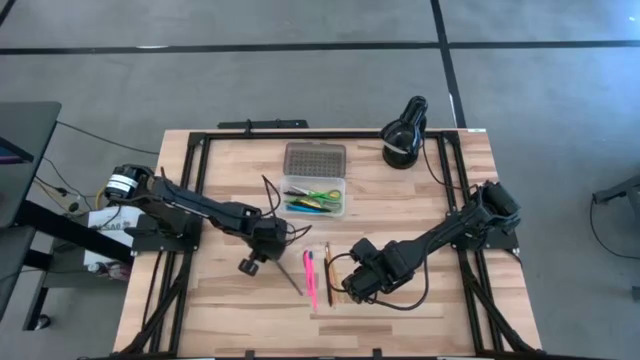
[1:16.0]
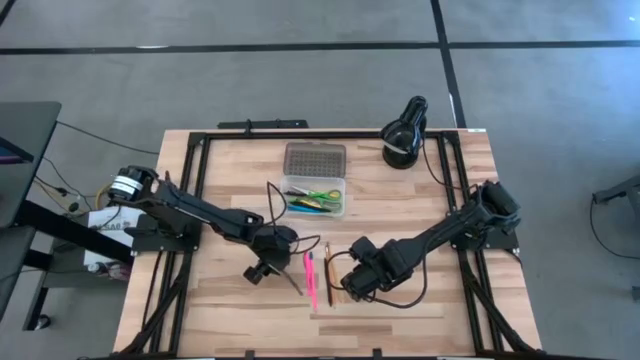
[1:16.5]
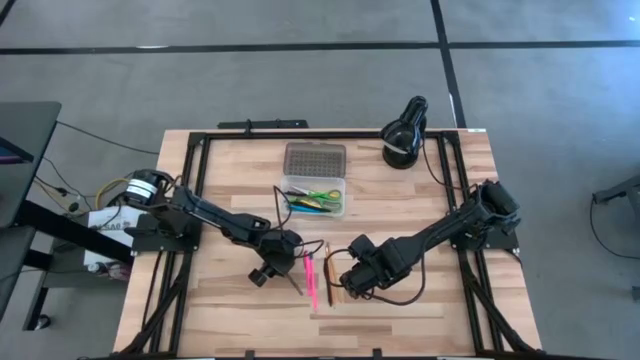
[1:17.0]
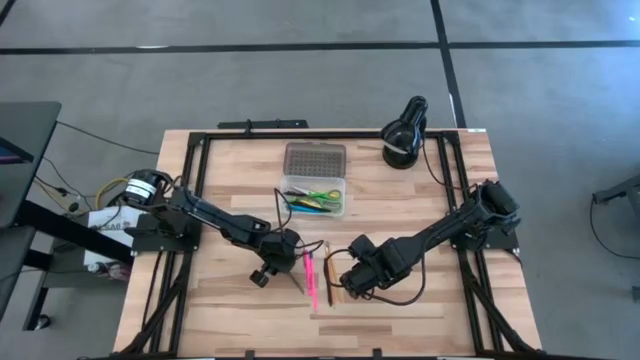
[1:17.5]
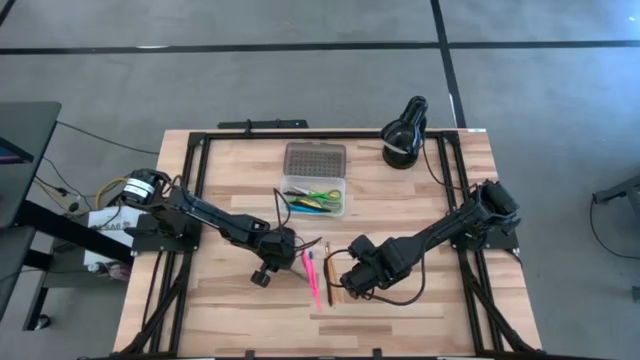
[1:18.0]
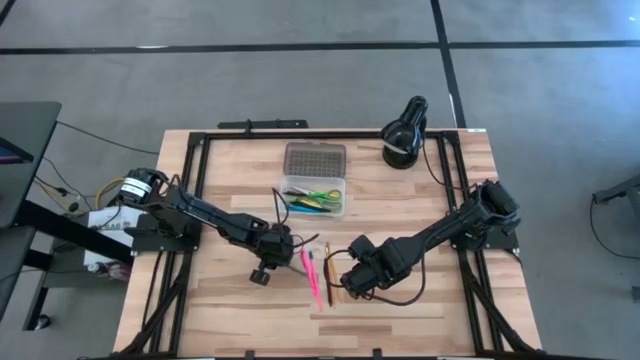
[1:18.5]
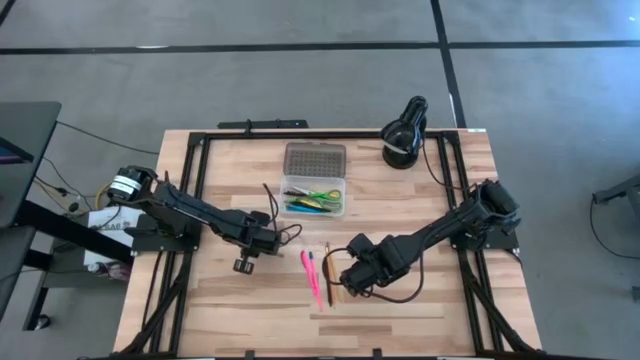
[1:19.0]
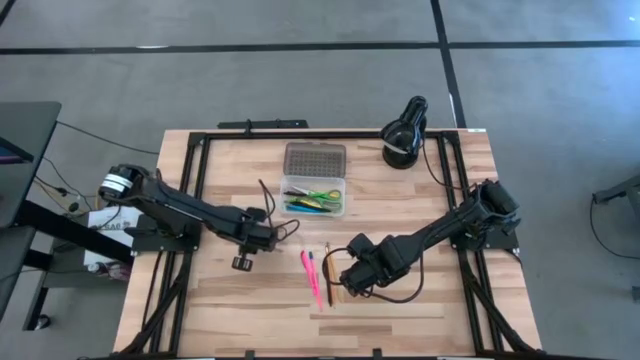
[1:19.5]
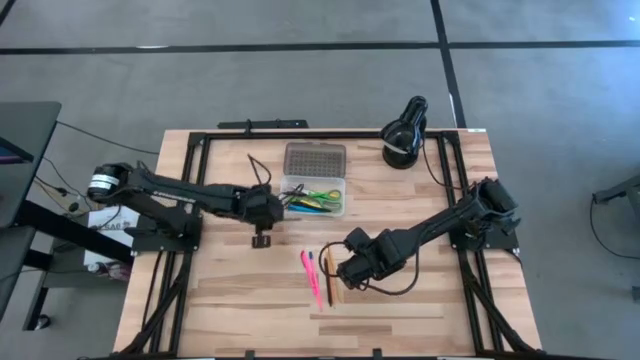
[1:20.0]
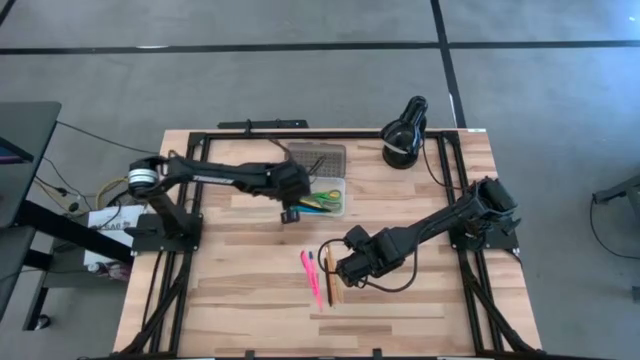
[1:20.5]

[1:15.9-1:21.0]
Task: Pick & place school supplies into a supply box
Put the gray pen into the supply box

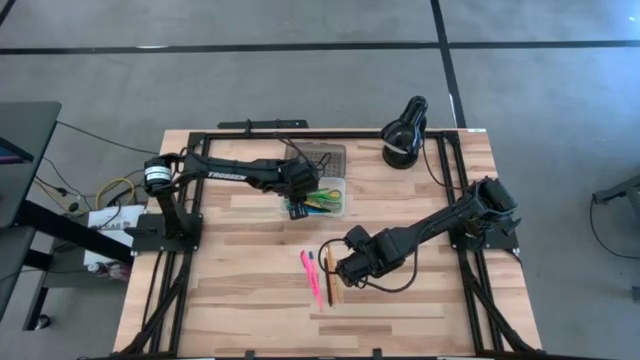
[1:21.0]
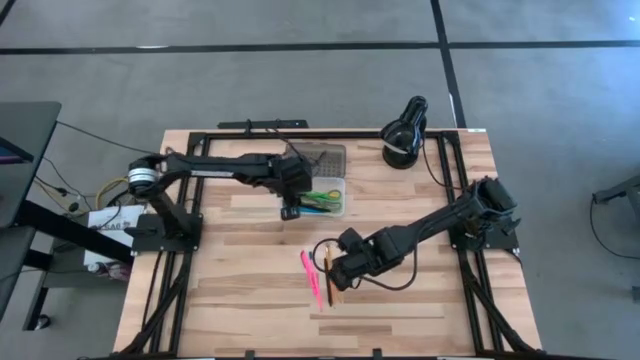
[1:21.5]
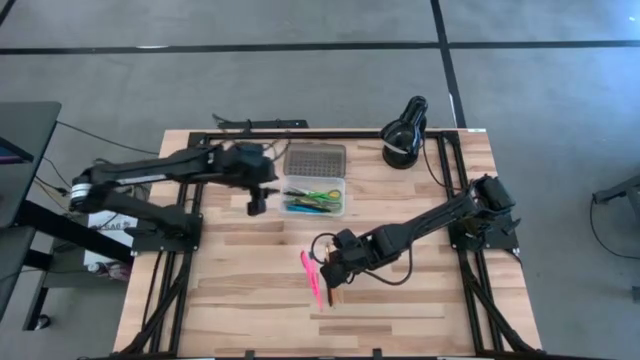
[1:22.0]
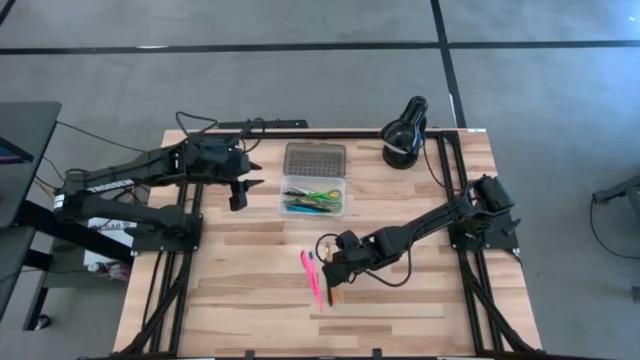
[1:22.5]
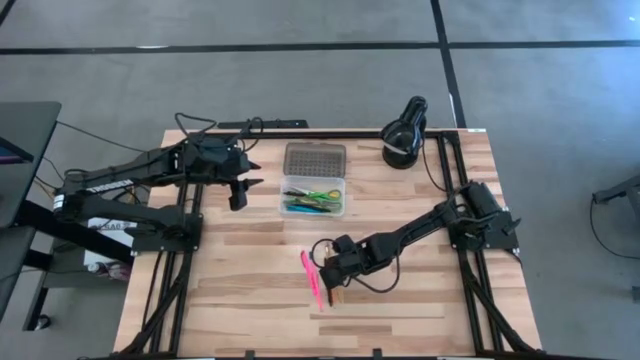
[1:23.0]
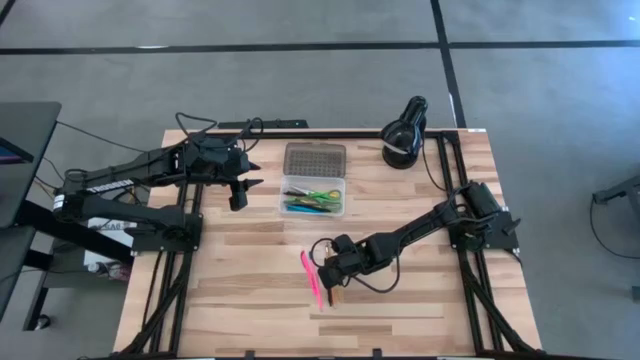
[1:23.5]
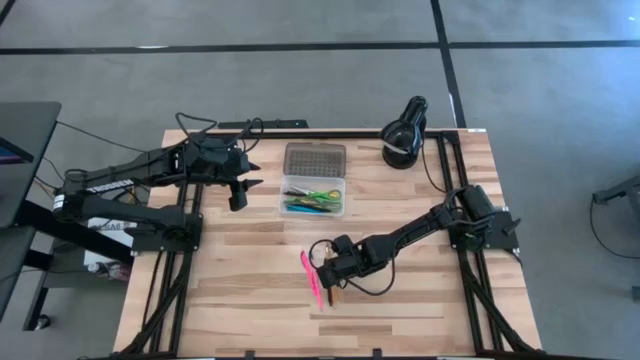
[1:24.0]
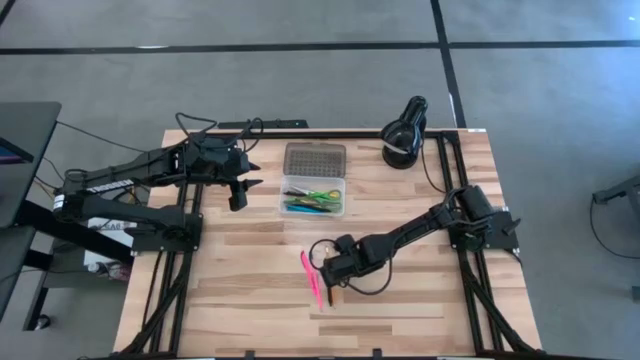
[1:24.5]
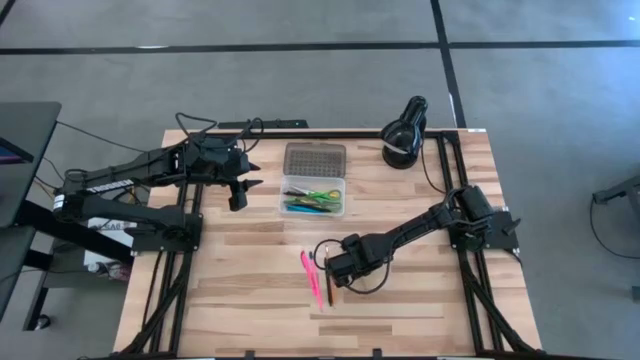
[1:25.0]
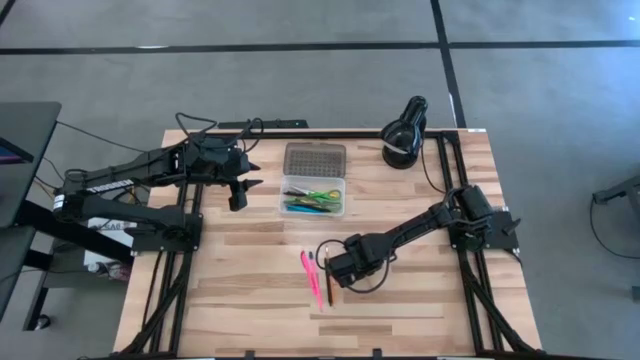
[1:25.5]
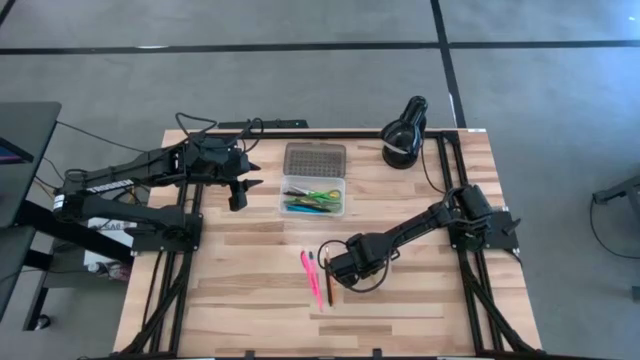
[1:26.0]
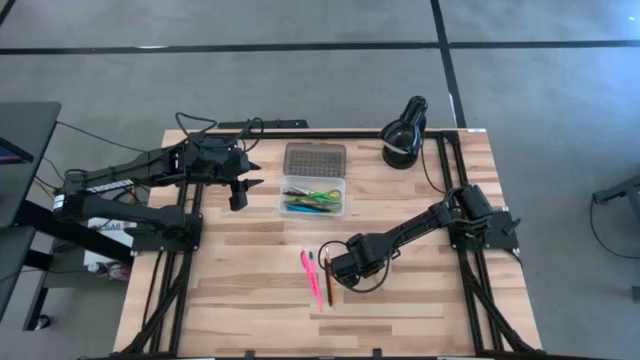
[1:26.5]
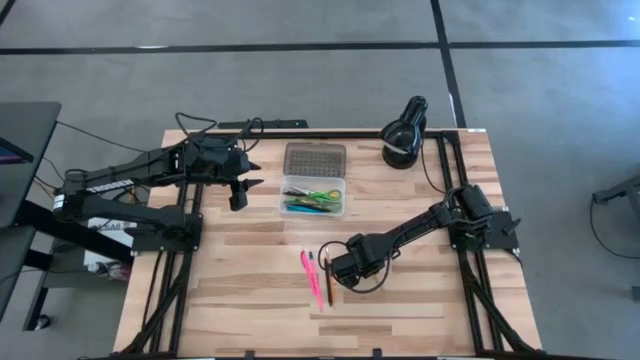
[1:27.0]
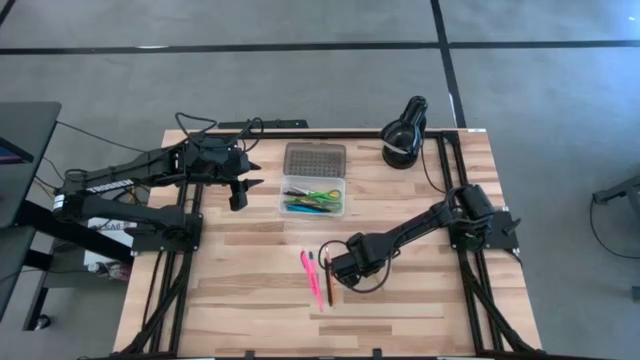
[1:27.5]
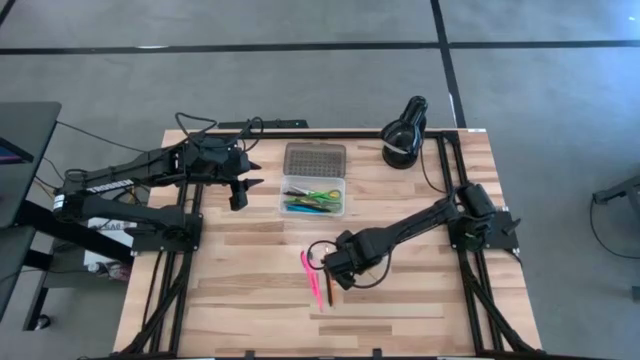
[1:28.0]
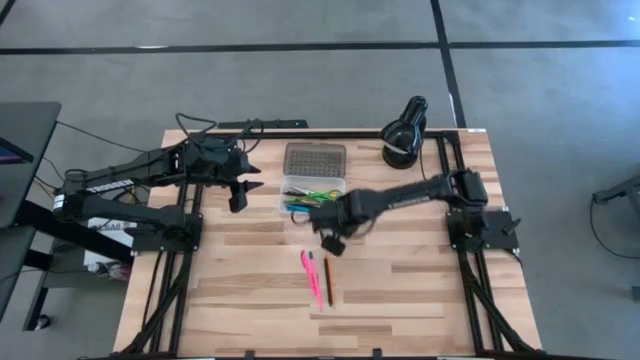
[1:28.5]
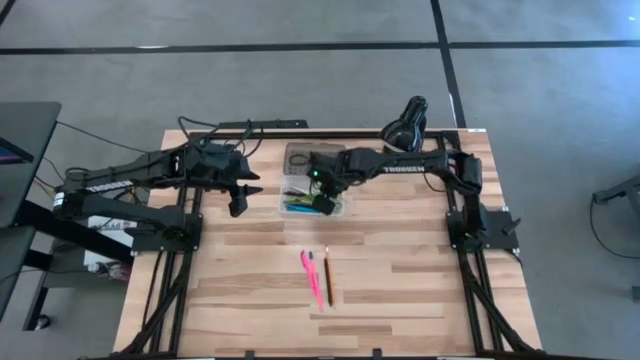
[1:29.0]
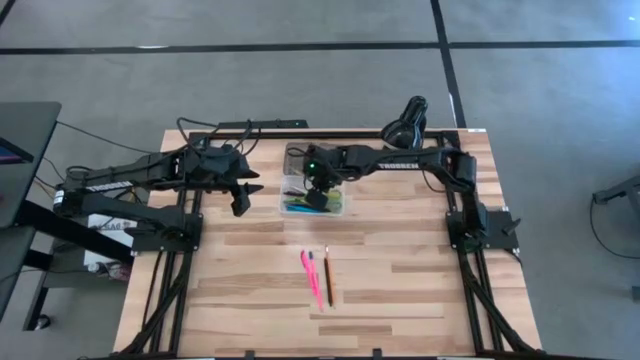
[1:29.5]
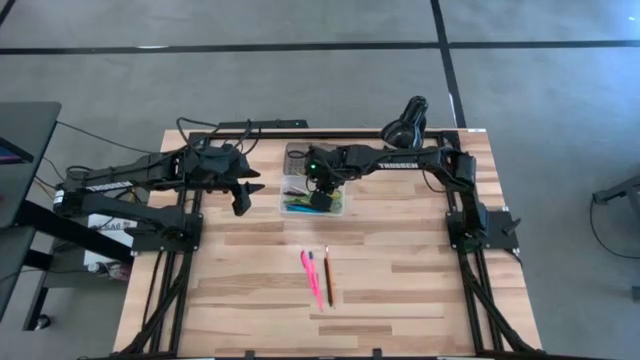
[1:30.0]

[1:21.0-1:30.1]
Put the yellow pencil into the supply box

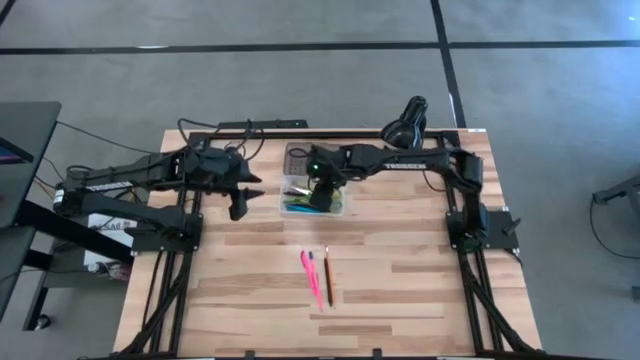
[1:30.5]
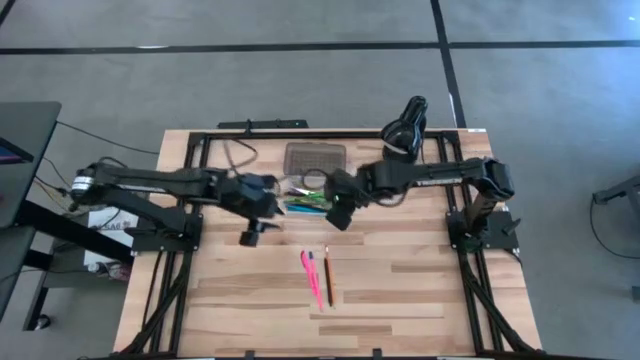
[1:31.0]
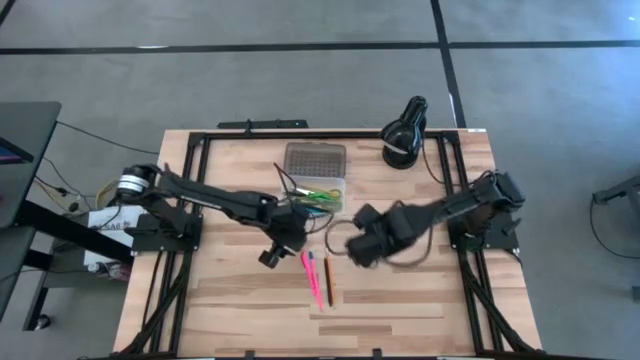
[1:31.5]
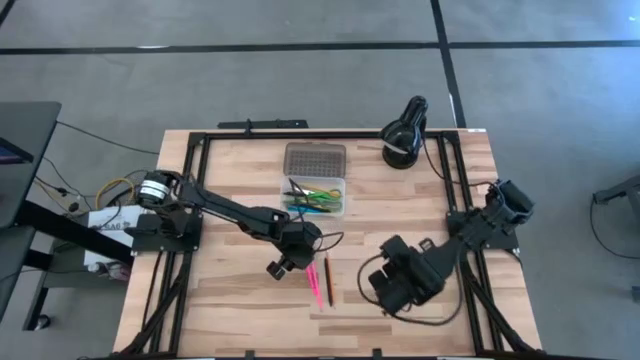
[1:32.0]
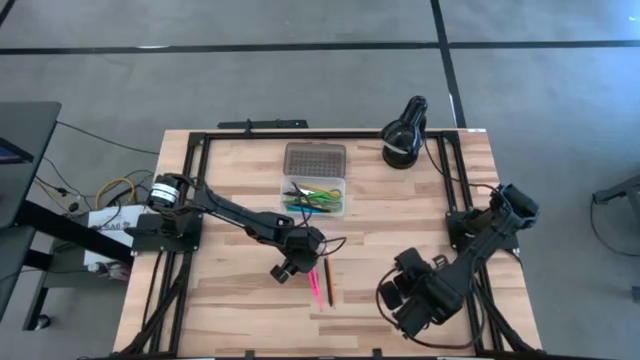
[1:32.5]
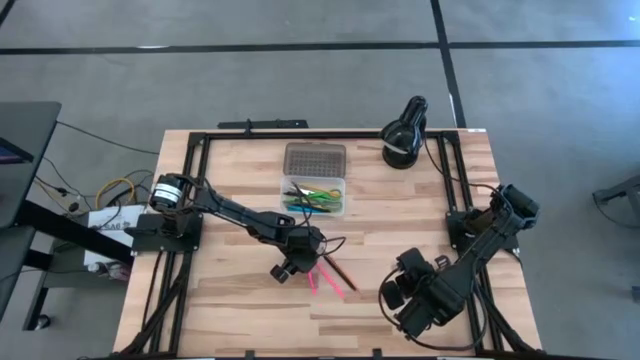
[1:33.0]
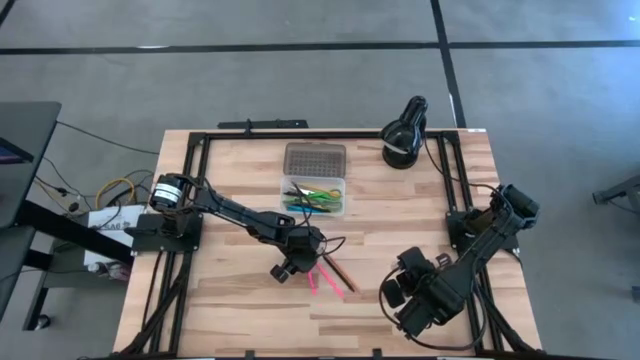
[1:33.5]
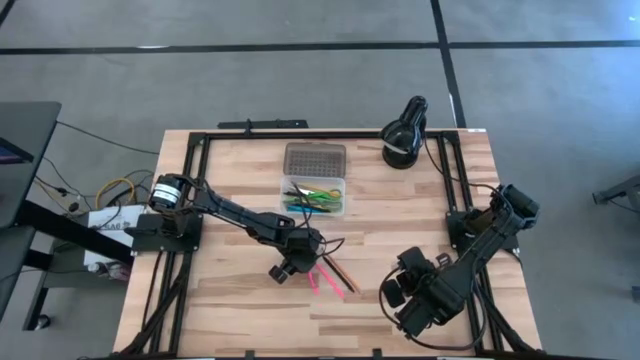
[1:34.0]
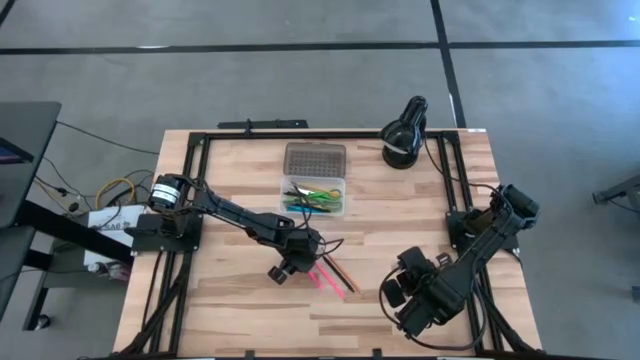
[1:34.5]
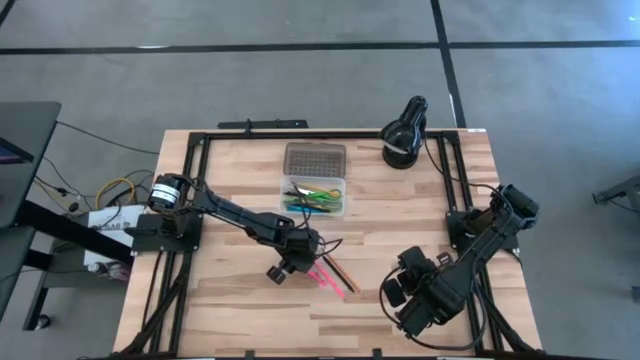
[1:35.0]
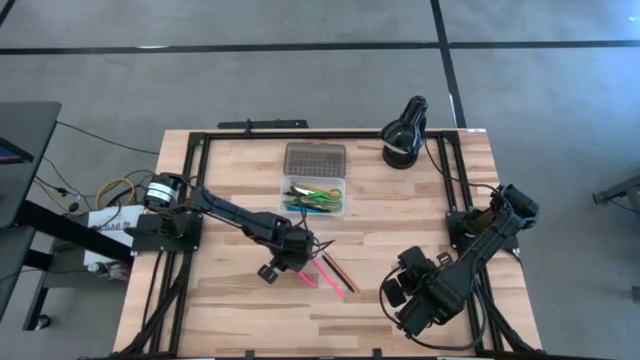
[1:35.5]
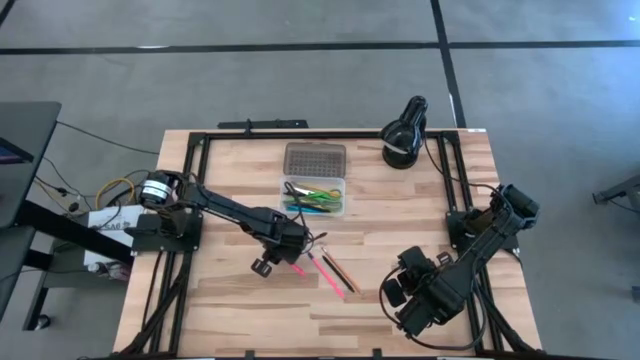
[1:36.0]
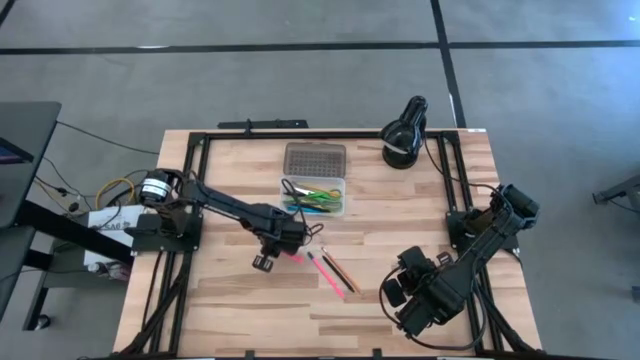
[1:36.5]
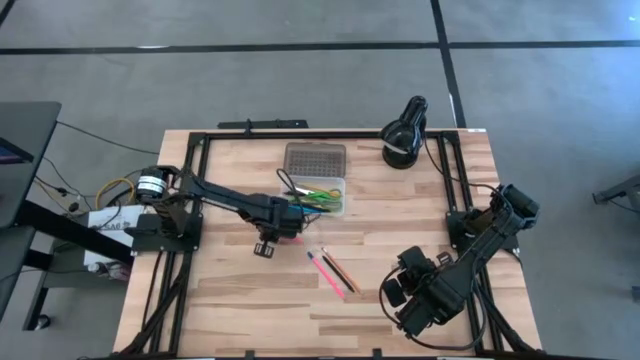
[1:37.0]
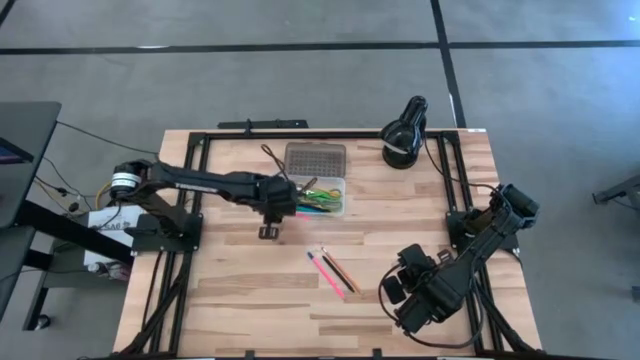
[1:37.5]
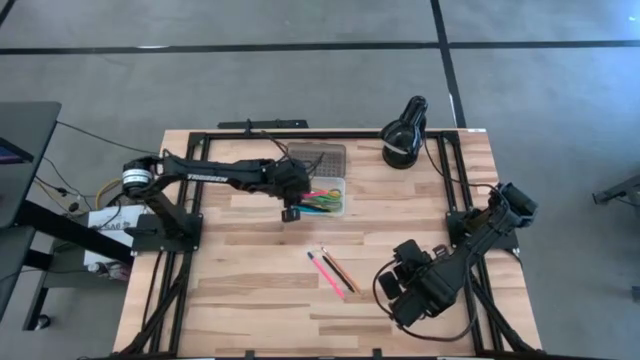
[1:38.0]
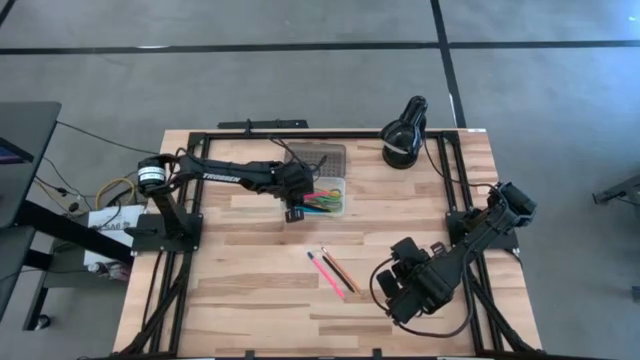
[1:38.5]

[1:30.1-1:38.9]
Put the pink pen into the supply box
